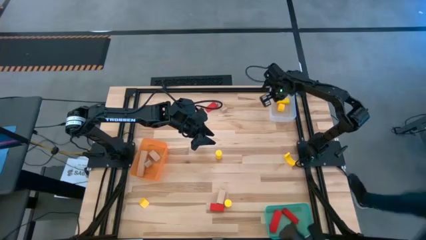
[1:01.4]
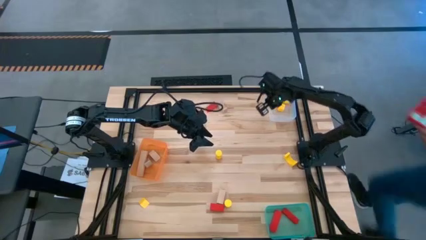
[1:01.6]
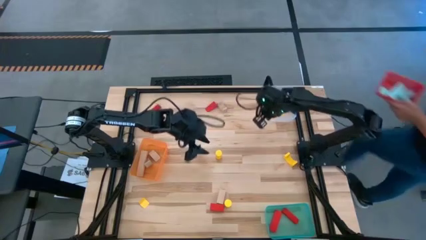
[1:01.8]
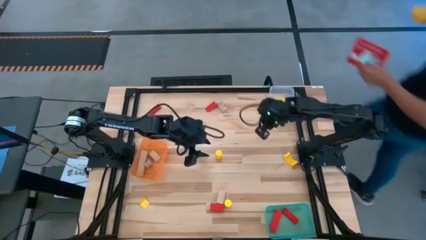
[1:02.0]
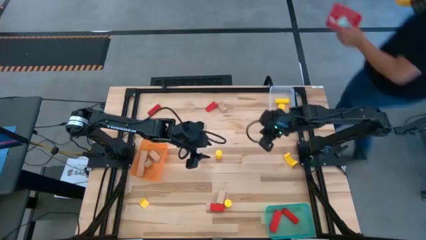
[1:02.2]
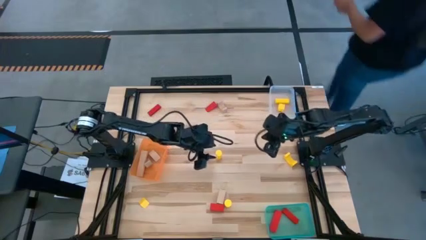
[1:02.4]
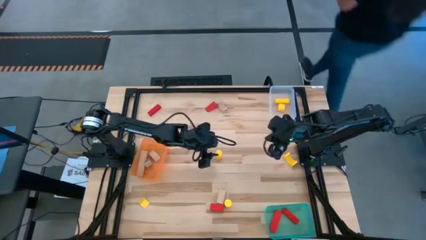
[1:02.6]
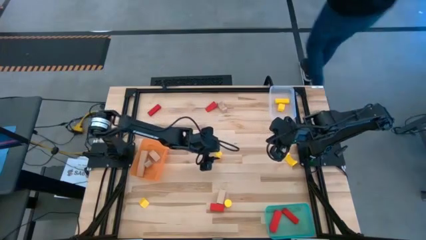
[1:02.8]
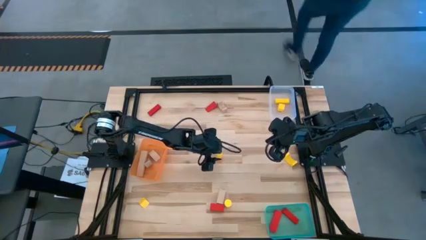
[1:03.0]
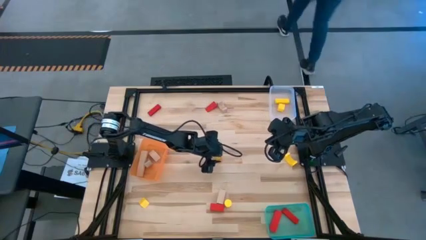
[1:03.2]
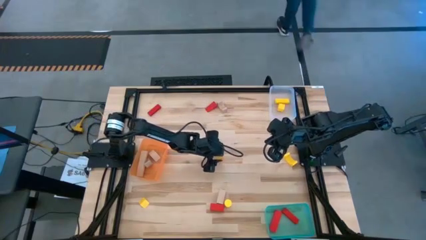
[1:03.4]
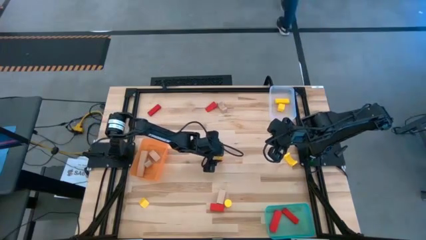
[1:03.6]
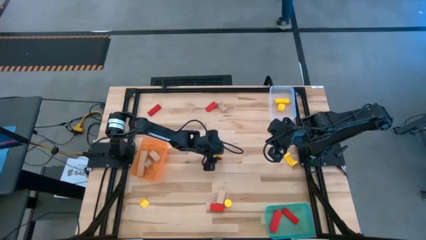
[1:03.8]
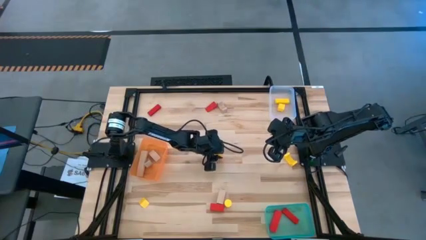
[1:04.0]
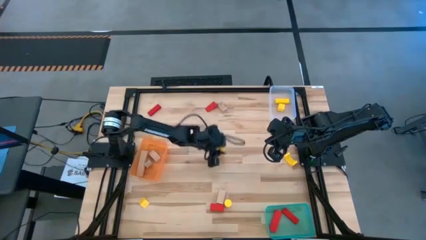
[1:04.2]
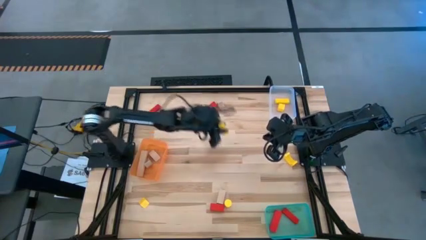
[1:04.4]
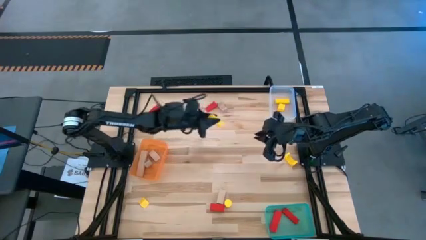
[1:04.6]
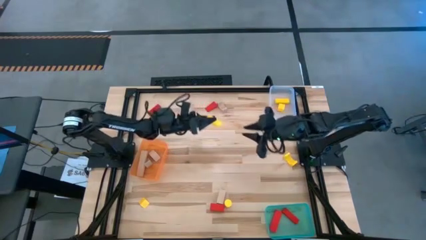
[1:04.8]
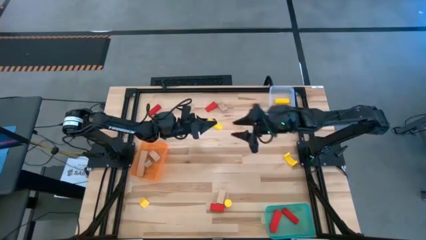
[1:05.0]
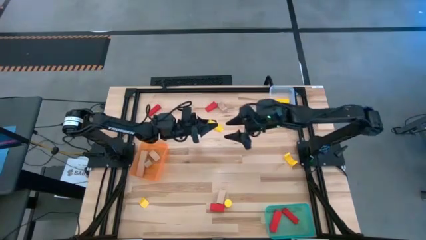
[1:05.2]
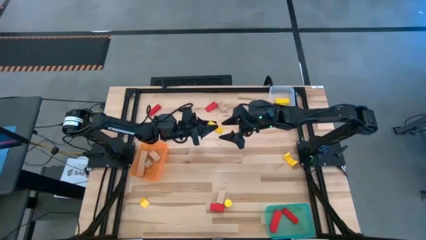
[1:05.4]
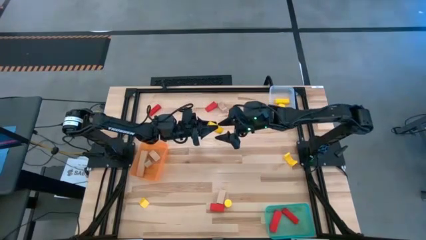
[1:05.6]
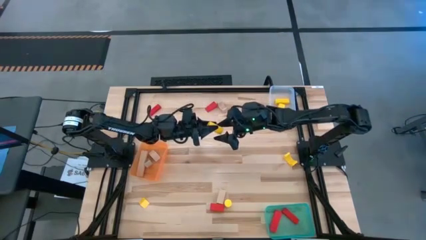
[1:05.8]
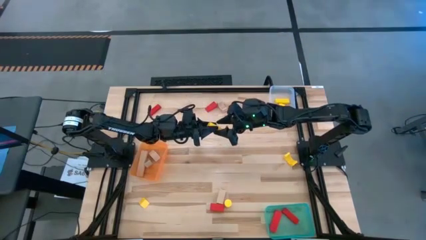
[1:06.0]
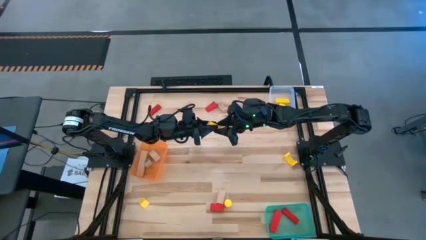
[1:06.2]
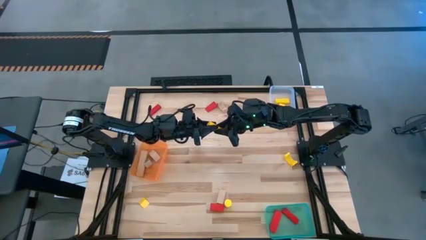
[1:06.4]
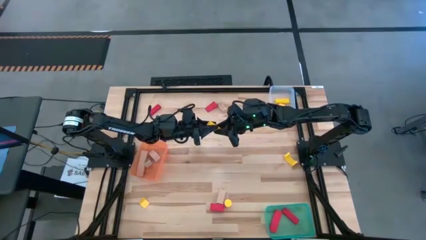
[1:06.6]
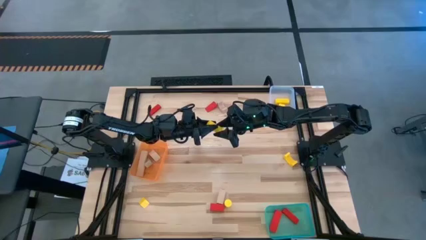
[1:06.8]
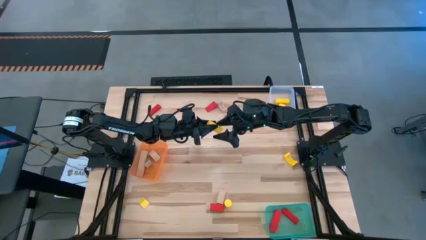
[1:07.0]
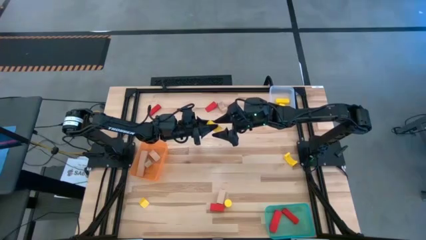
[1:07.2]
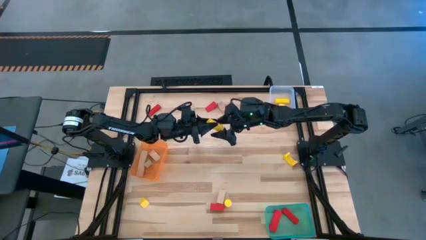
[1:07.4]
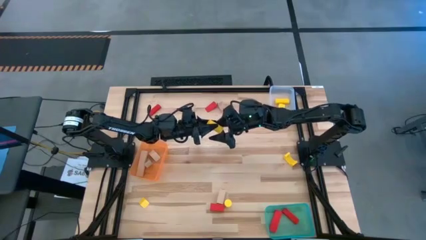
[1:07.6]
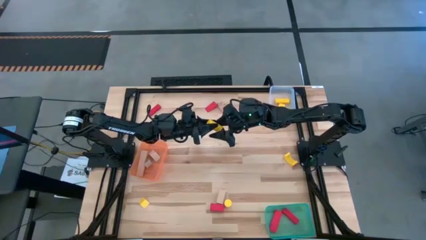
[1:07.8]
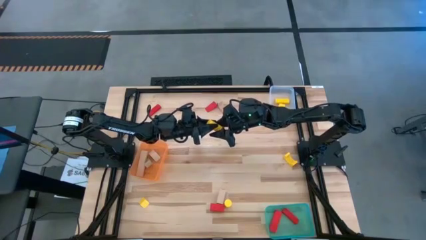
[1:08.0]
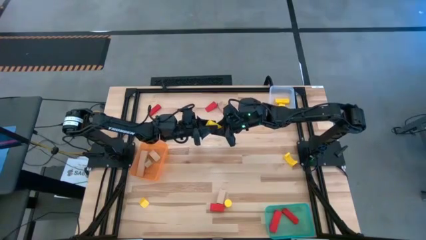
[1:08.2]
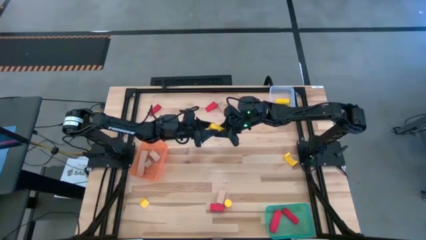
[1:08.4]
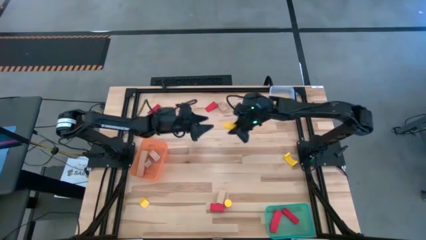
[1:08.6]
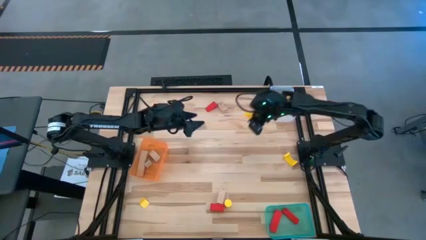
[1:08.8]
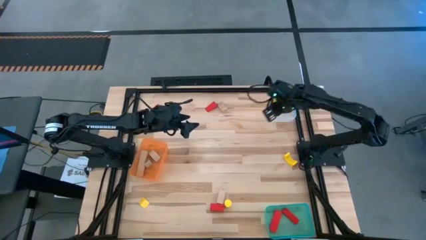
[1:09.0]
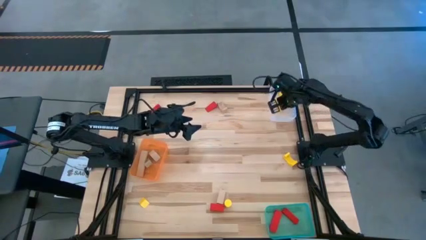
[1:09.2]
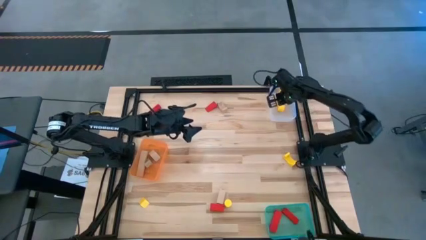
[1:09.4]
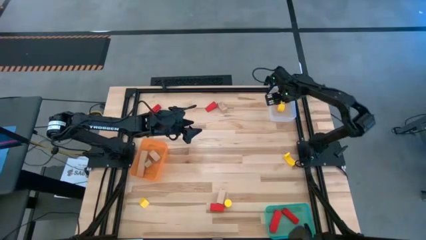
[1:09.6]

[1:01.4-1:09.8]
Task: Sort & place blocks by color
Put the yellow block into the transparent bin

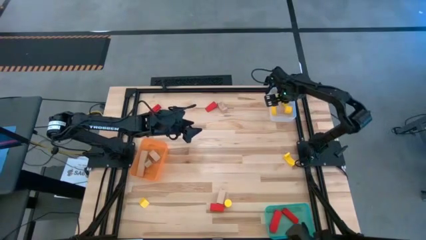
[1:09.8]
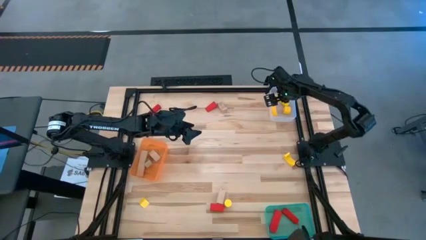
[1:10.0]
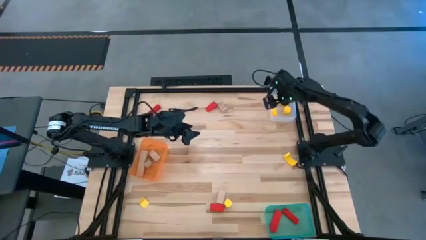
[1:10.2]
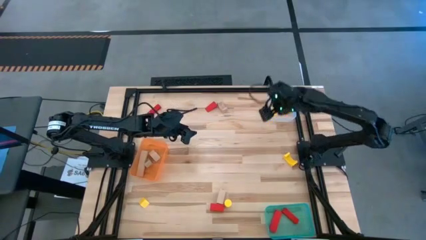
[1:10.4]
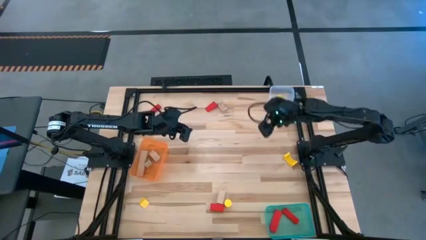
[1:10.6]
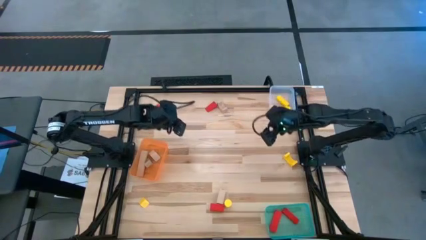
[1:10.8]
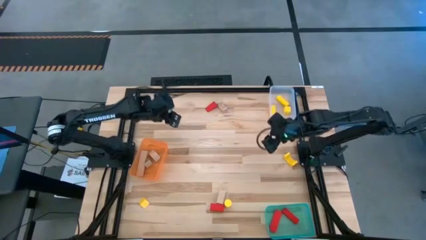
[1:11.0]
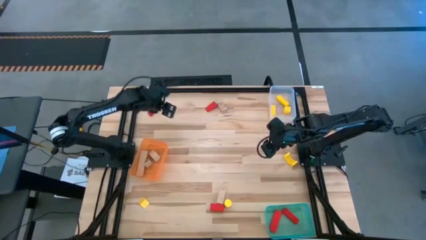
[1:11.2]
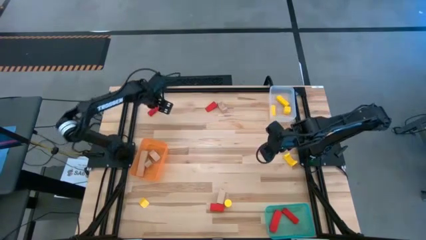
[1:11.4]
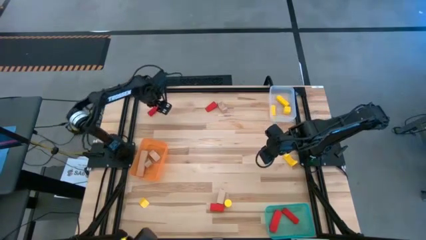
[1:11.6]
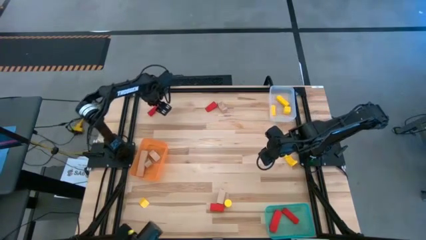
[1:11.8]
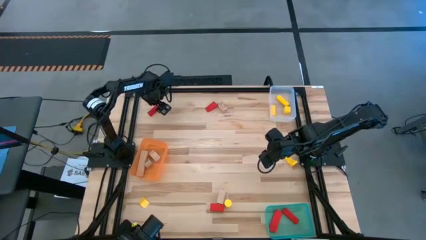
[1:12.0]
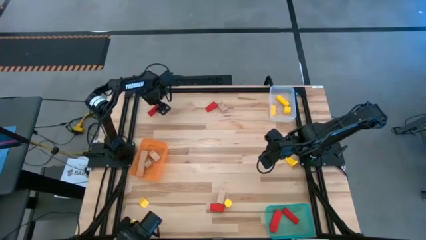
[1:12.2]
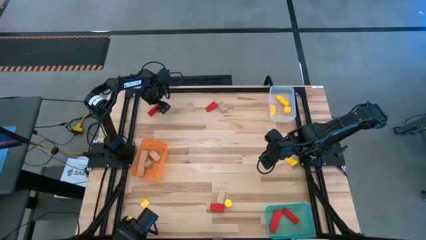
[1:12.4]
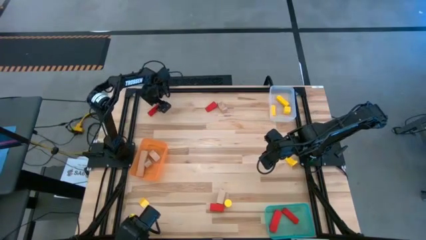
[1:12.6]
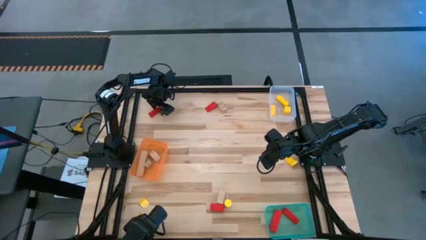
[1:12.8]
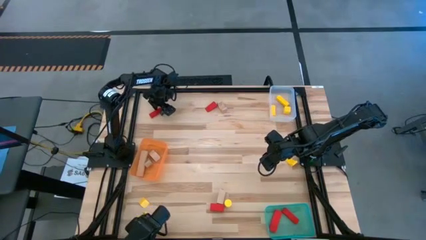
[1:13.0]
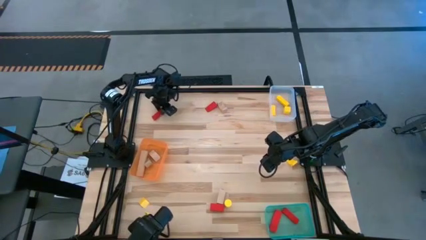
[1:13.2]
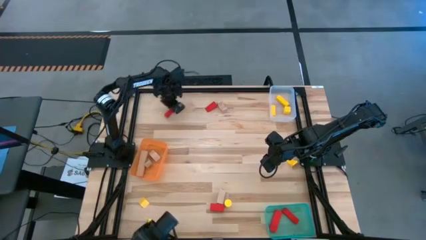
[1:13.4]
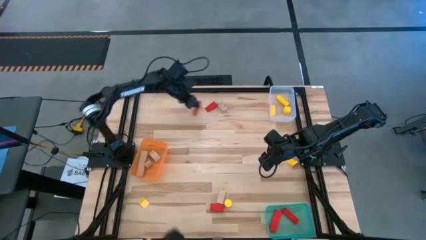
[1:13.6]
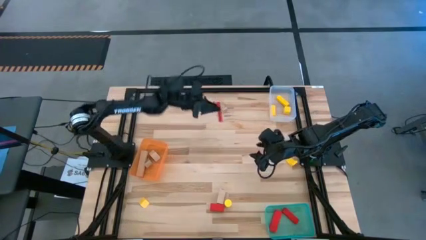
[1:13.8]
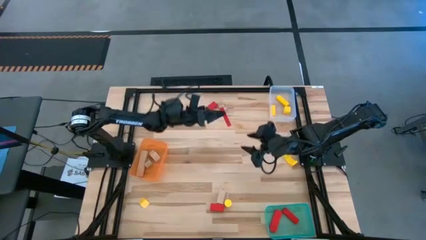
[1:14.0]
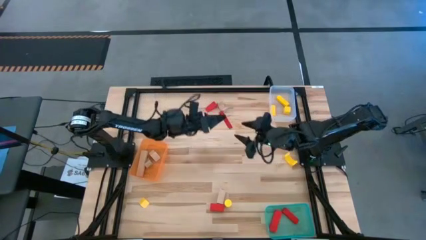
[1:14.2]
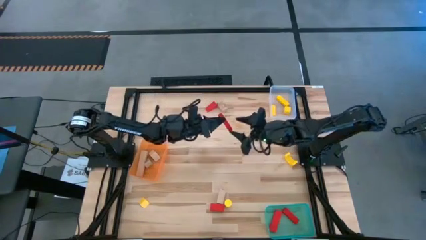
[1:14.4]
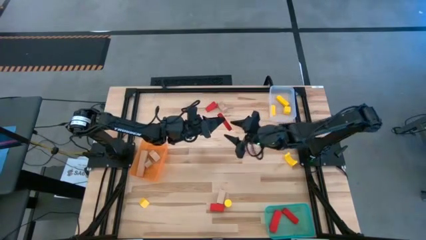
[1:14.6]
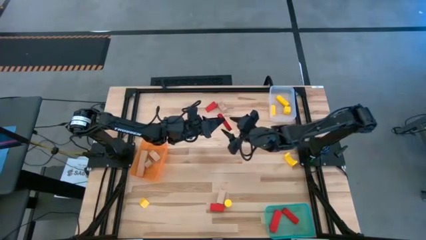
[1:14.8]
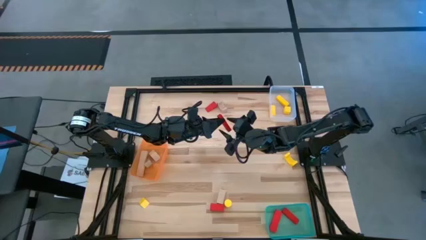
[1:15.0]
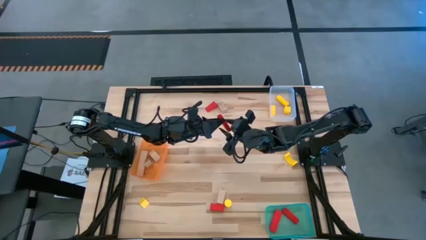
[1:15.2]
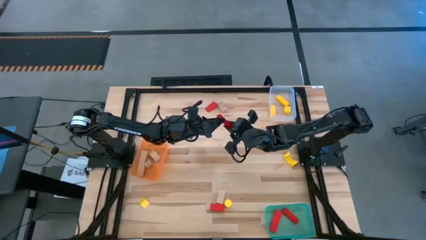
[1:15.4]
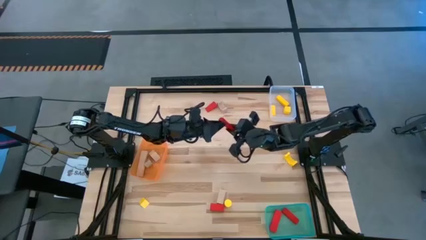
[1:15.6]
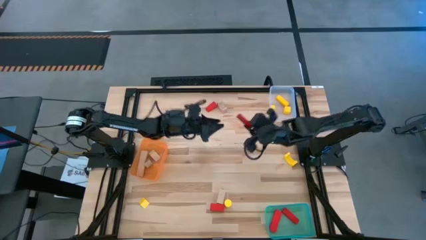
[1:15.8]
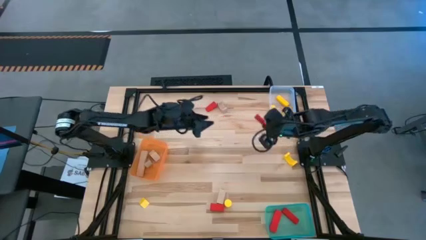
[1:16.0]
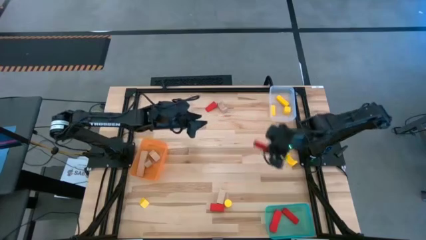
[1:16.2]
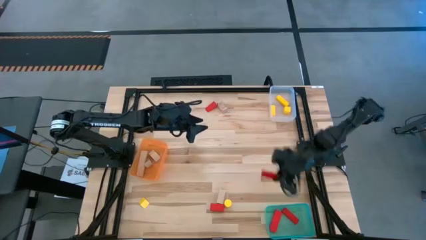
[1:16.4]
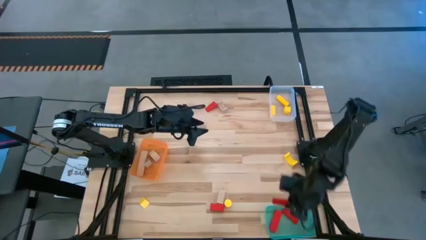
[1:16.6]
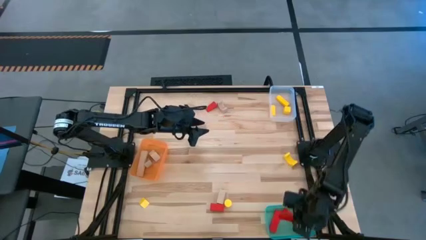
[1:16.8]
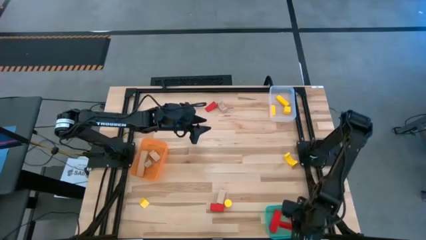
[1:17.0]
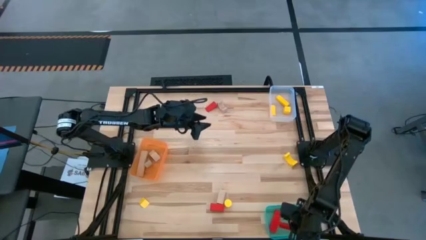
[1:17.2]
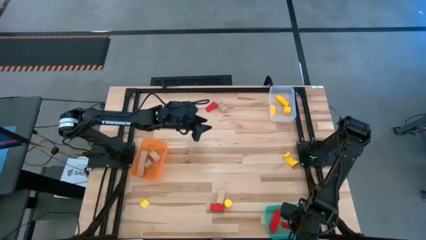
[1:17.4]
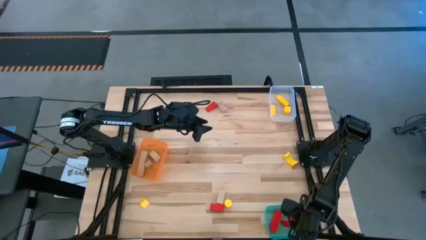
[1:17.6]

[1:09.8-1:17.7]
Put the red block into the green bin
